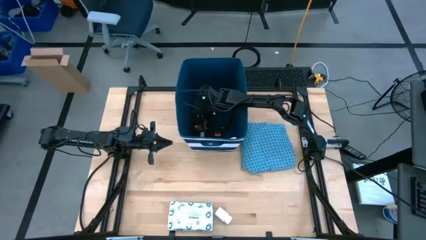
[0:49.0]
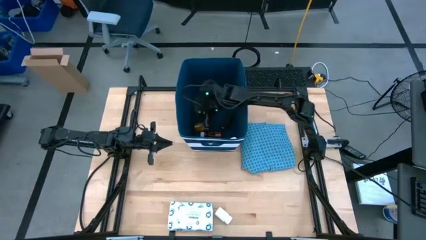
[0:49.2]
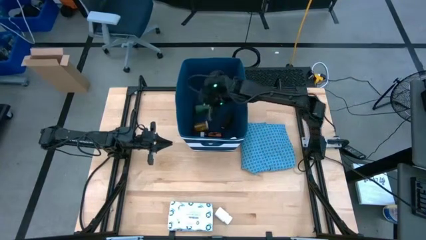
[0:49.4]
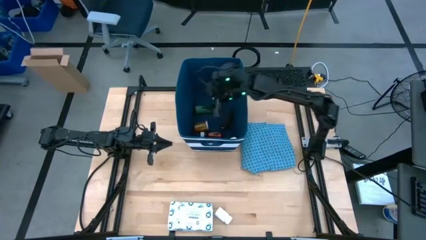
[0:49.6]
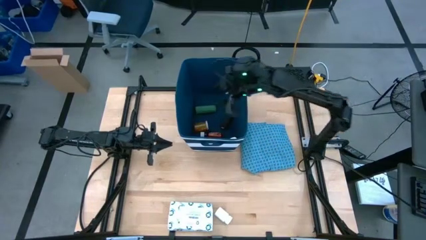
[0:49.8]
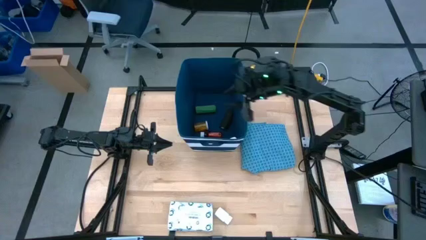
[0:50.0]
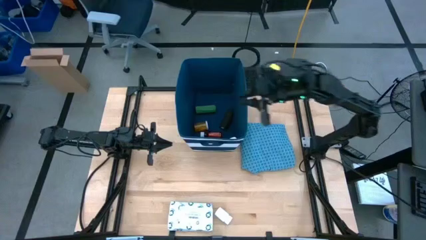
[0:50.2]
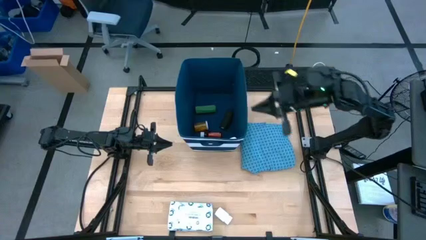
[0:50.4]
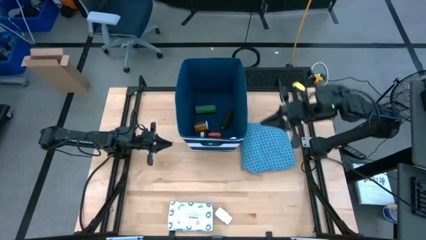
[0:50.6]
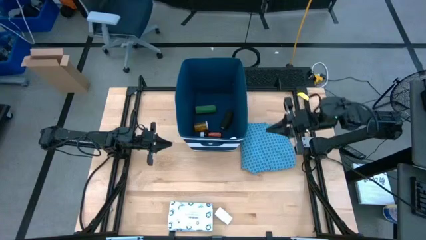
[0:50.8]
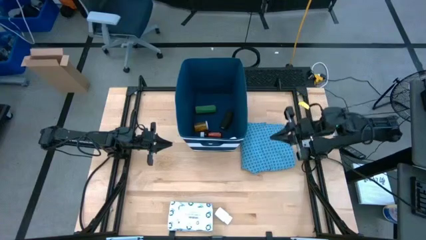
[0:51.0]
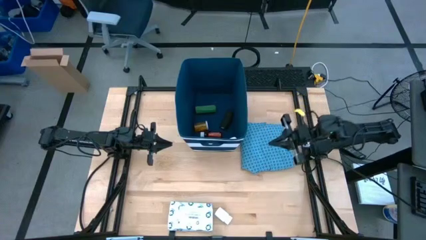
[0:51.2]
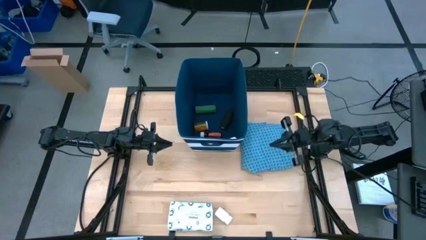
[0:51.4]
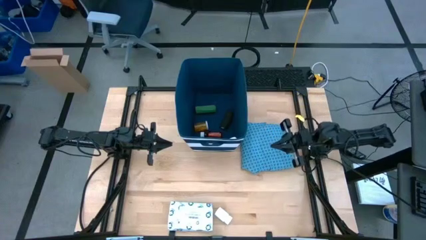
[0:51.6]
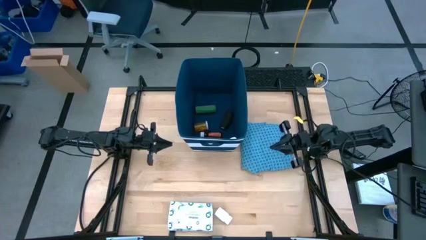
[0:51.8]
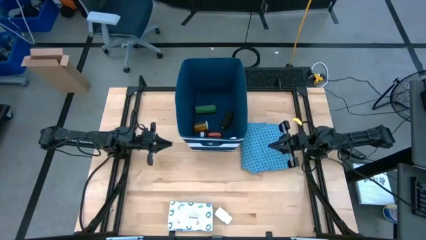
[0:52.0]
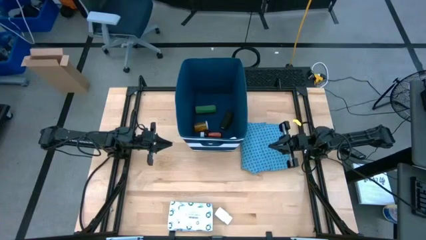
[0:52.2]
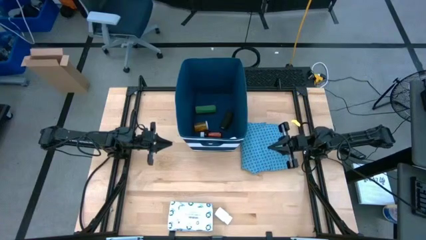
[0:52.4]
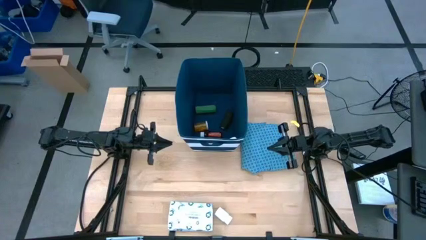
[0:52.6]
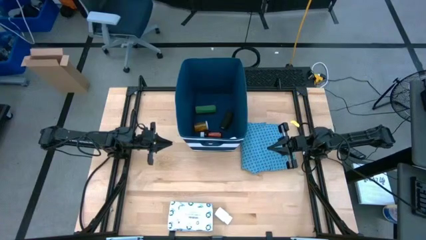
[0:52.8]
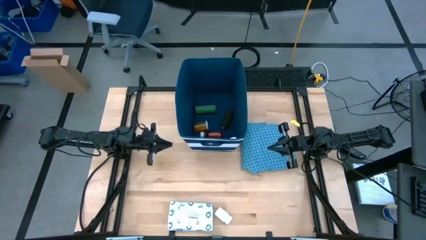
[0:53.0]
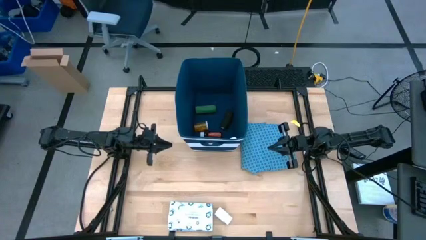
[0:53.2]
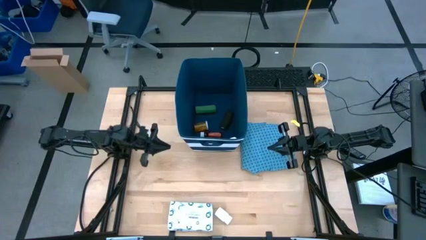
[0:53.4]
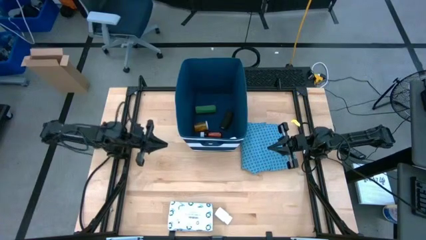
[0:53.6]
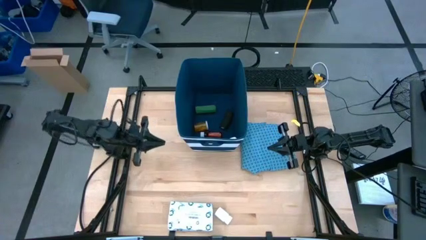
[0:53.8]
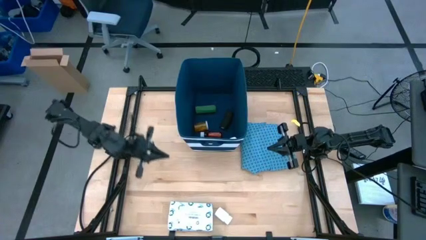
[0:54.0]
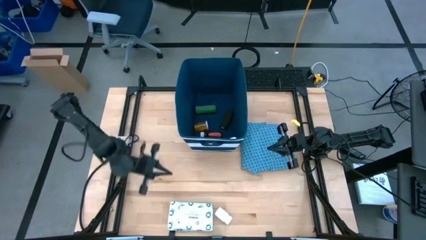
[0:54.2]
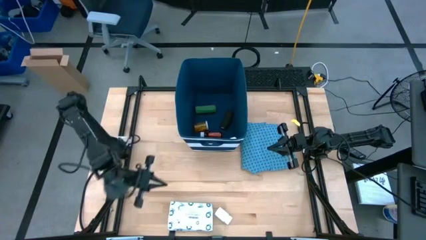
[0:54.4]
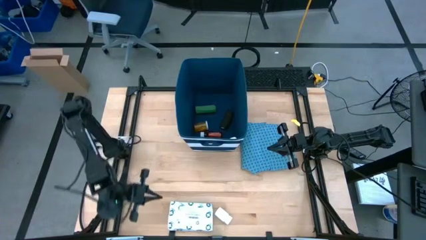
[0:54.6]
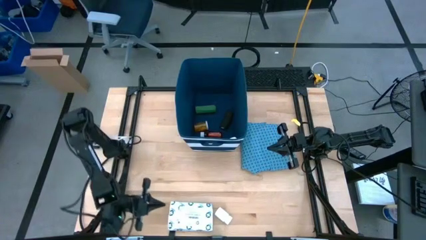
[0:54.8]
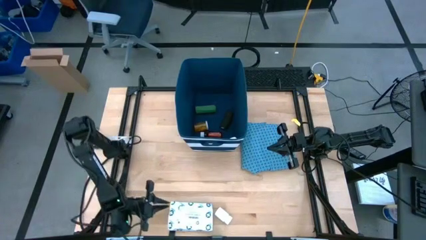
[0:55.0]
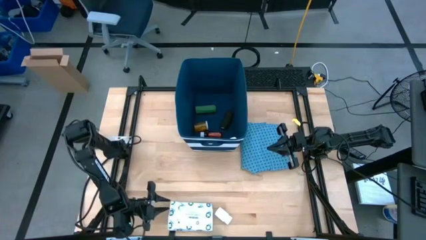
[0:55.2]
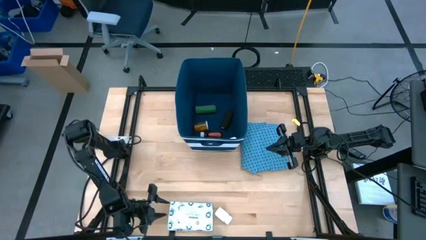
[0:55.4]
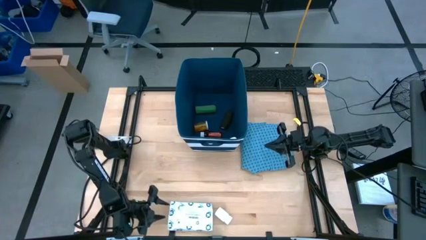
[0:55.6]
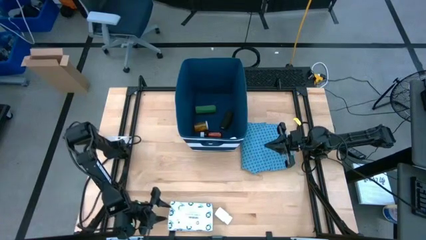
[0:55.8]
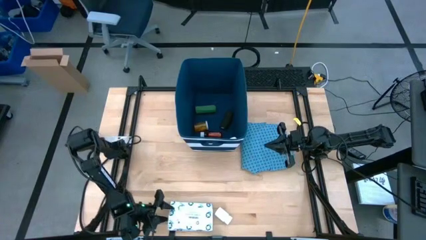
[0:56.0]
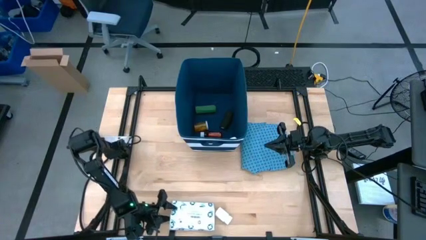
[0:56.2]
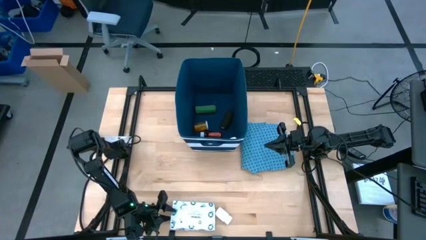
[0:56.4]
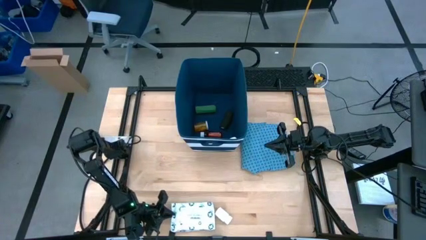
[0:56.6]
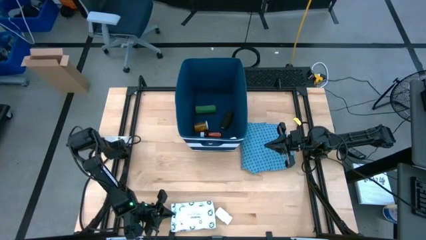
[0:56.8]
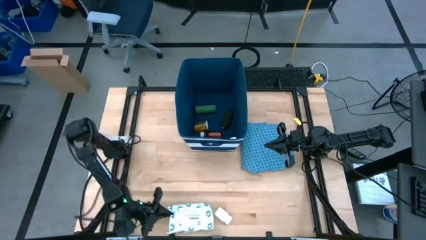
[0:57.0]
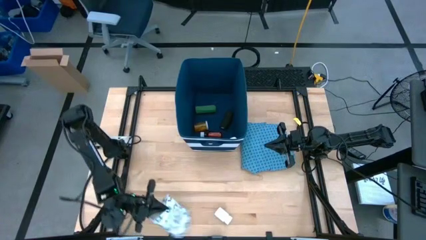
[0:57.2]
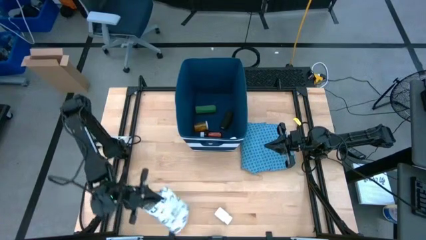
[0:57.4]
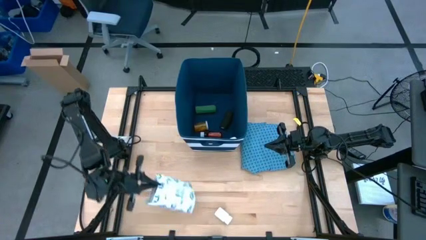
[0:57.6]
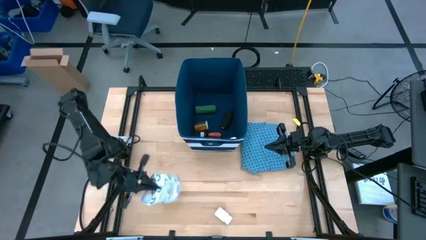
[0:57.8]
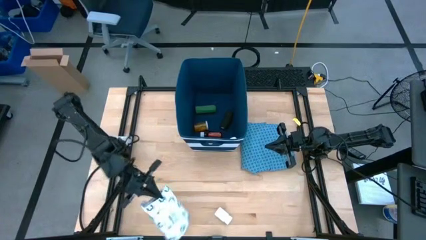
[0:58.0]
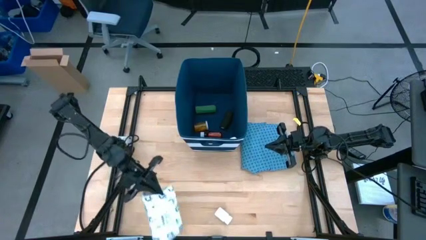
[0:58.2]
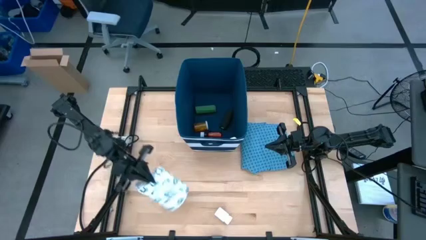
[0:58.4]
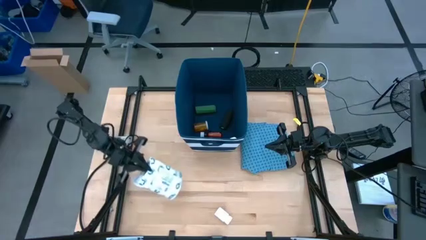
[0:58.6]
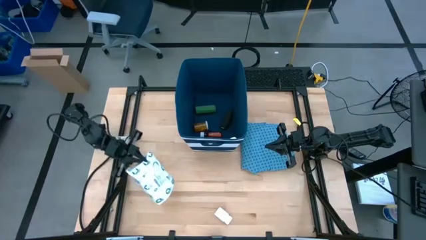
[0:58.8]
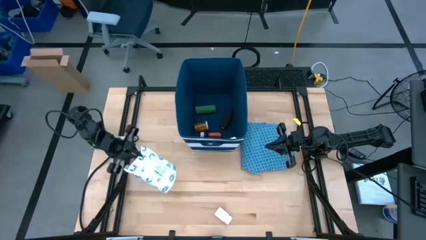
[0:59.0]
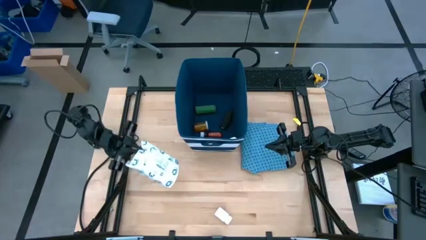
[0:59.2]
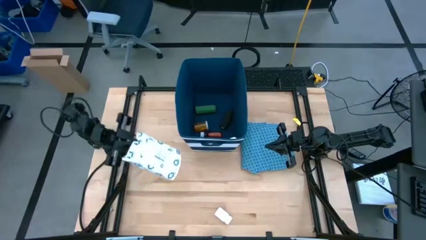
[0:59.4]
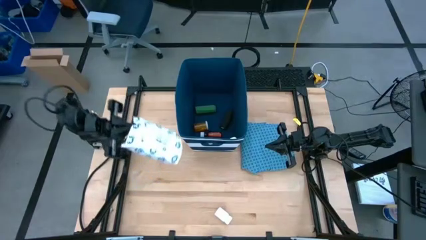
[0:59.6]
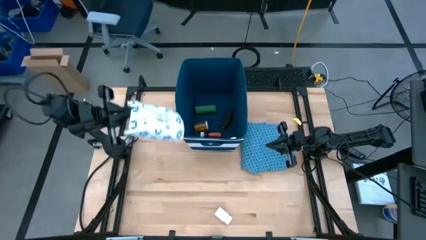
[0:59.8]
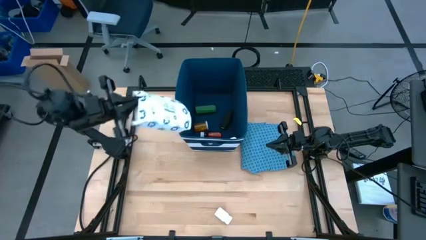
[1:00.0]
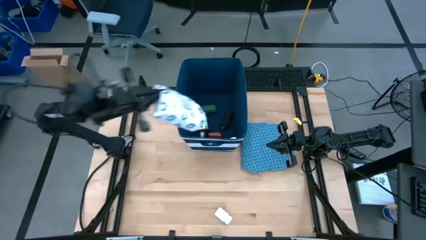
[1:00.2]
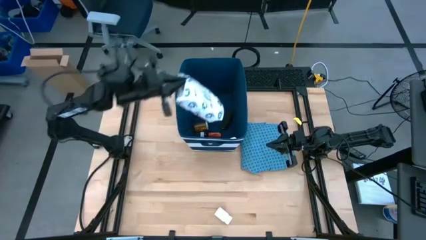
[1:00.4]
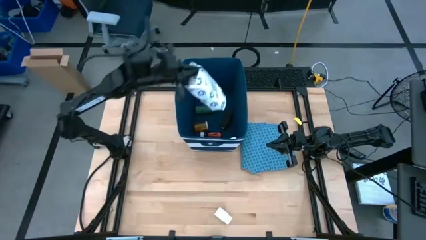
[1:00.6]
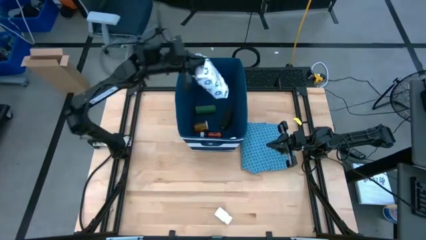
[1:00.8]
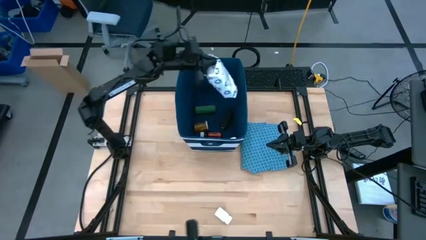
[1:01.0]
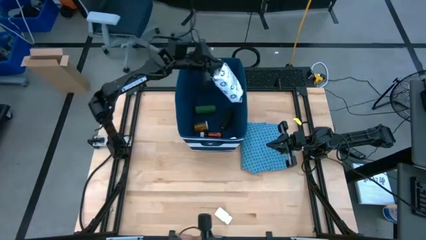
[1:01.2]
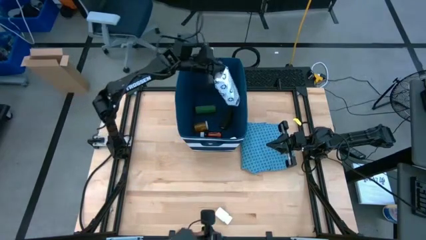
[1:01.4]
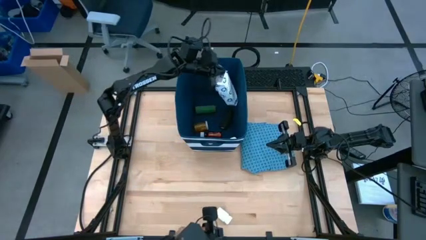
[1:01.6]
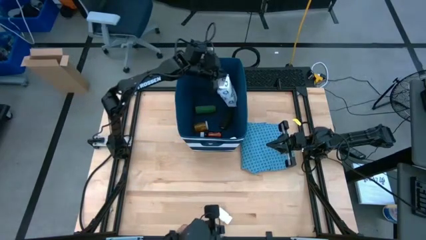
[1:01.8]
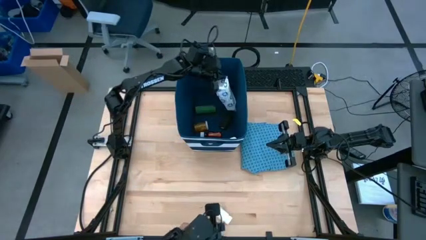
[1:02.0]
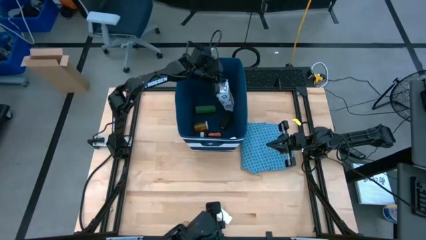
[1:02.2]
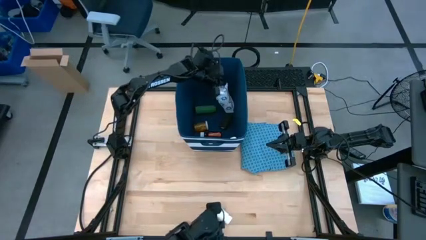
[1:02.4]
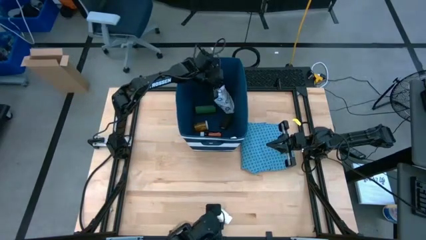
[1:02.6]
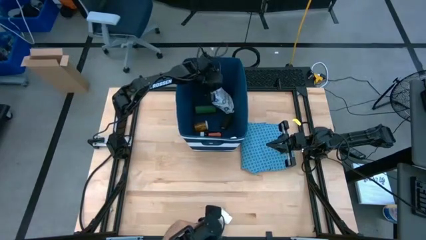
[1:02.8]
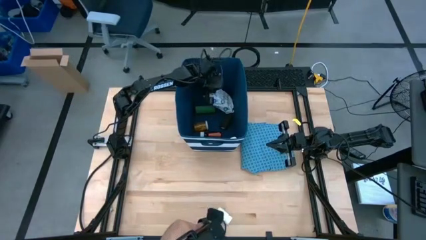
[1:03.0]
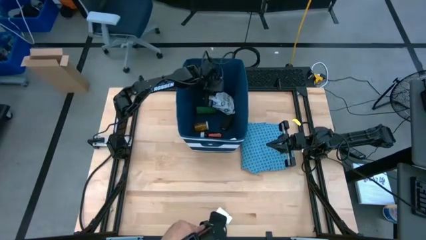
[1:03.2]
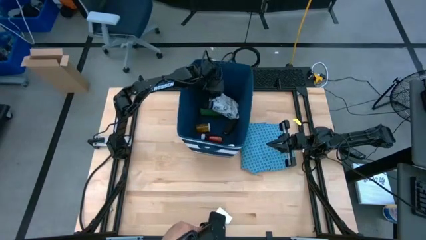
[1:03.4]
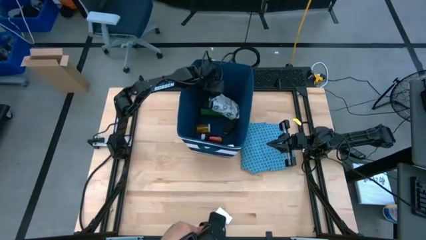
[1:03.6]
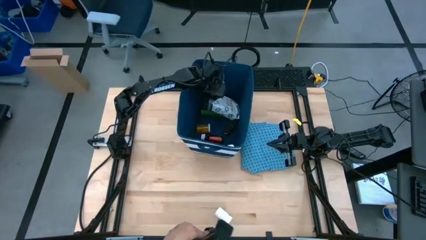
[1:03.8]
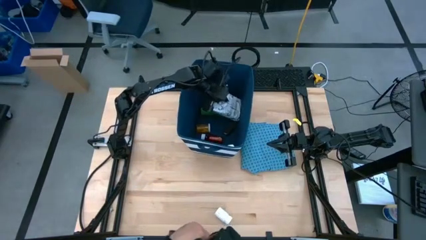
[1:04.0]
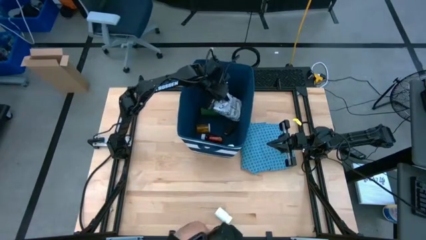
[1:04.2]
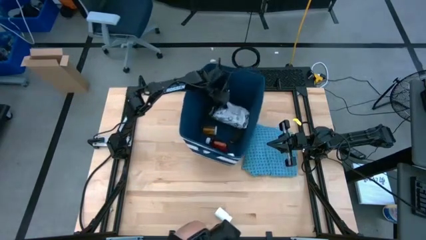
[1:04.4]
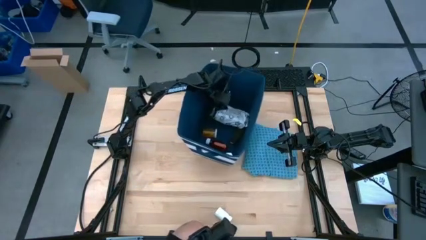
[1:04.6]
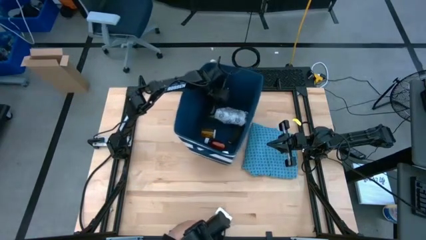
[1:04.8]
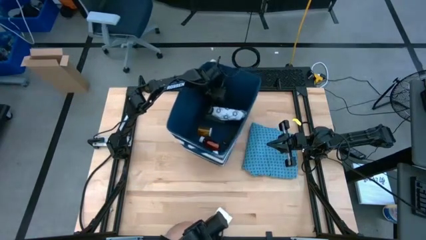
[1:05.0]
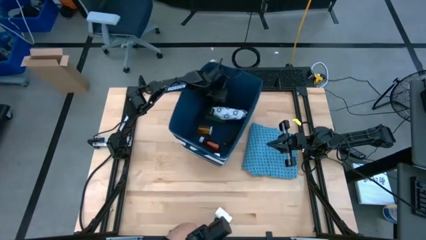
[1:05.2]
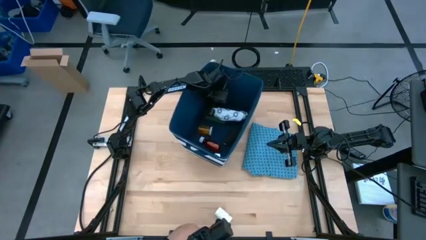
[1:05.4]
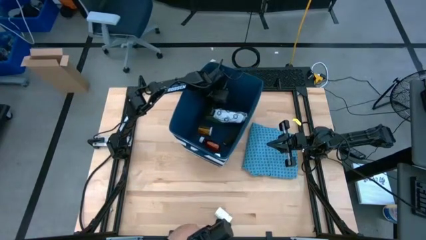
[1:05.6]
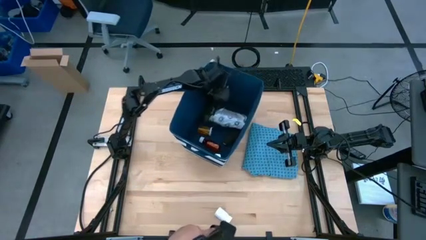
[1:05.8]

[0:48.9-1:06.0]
Task: Pick & place medical supplies in basket/bin
Put the mailer bag into the blue bin
